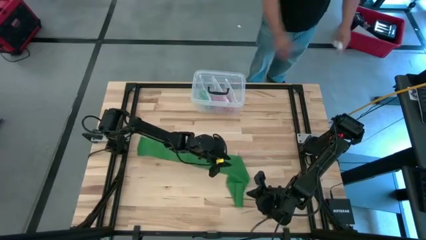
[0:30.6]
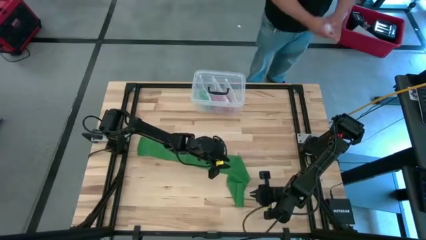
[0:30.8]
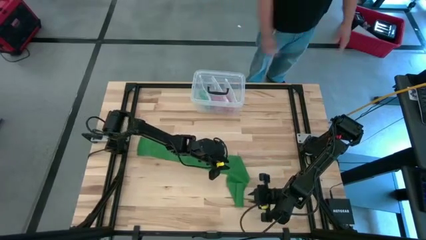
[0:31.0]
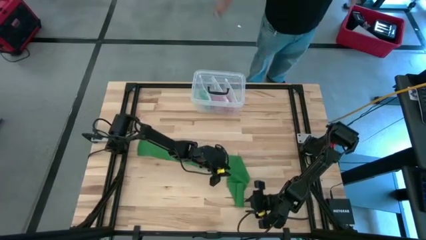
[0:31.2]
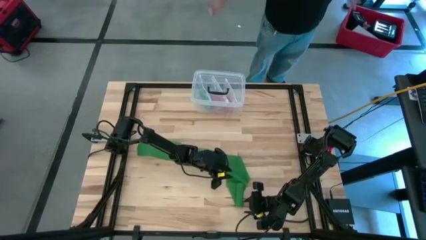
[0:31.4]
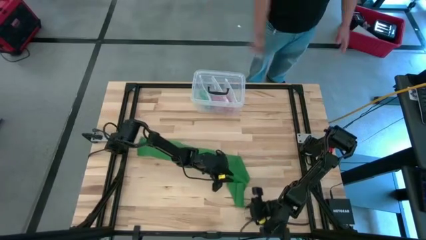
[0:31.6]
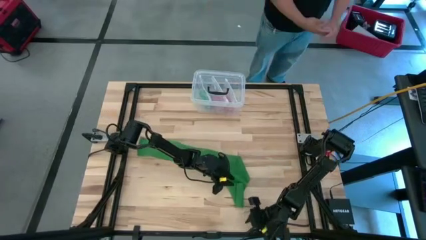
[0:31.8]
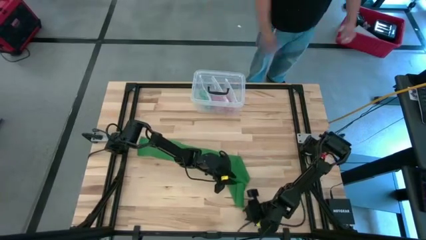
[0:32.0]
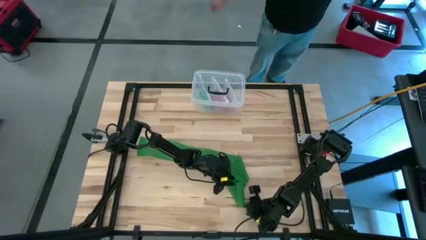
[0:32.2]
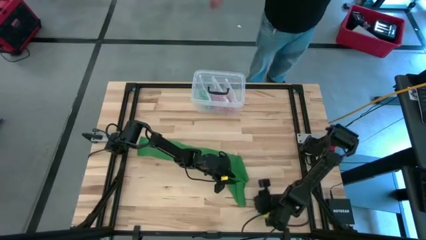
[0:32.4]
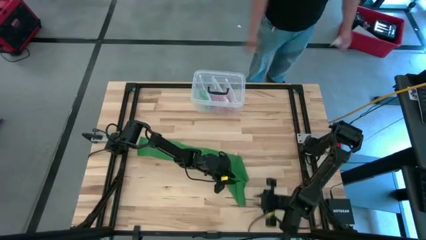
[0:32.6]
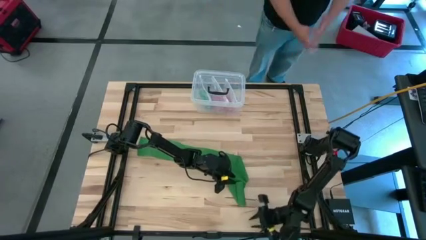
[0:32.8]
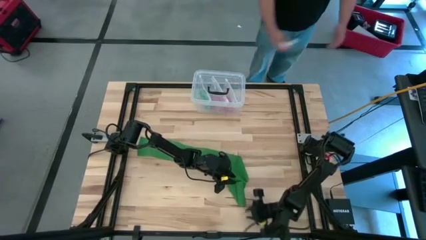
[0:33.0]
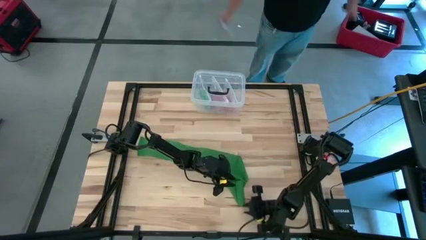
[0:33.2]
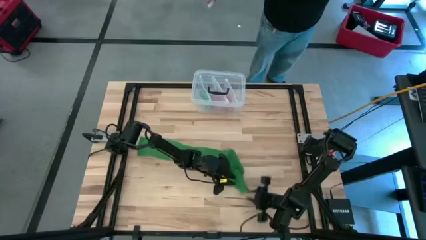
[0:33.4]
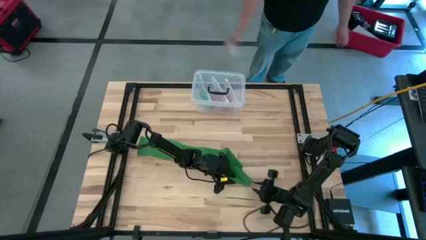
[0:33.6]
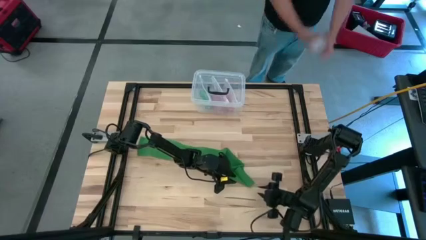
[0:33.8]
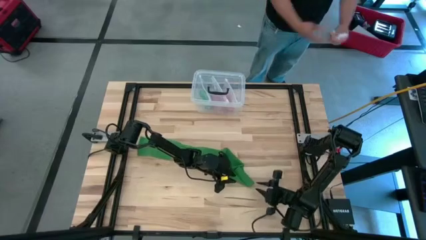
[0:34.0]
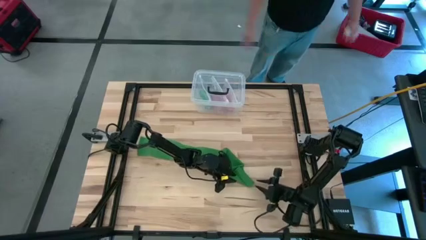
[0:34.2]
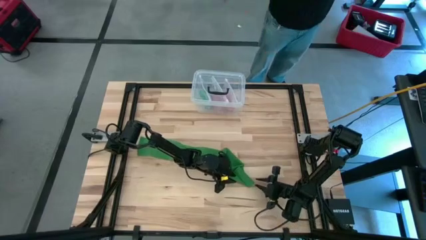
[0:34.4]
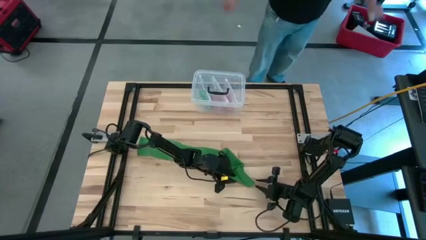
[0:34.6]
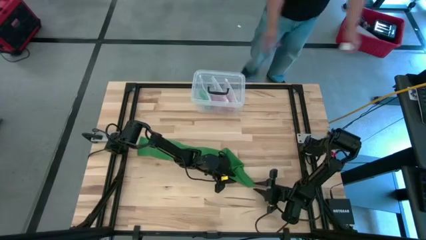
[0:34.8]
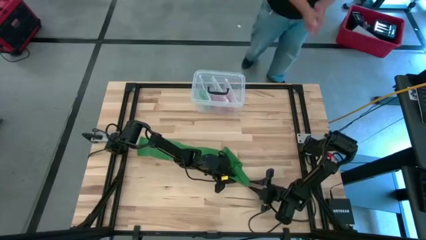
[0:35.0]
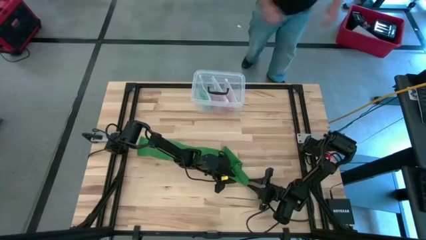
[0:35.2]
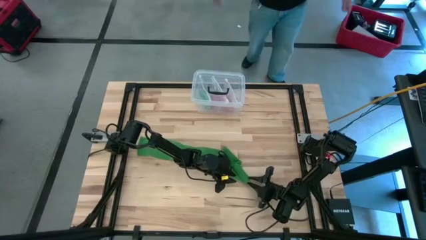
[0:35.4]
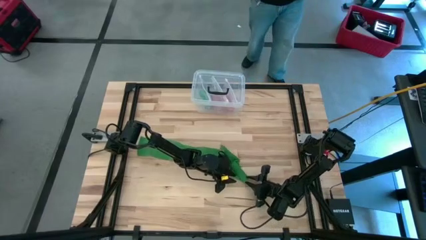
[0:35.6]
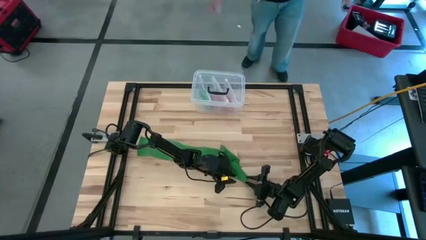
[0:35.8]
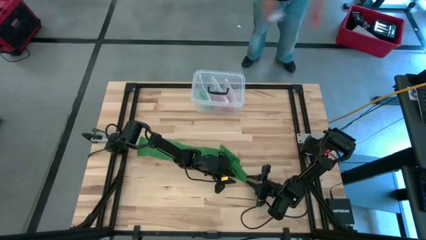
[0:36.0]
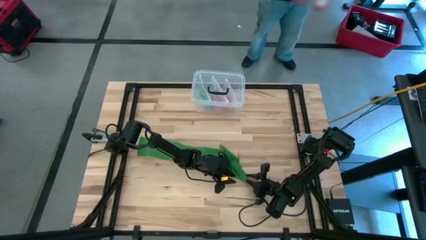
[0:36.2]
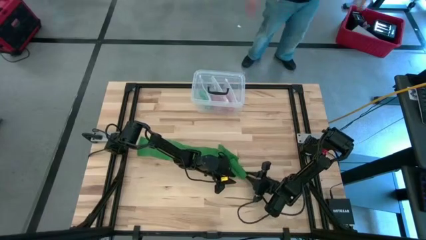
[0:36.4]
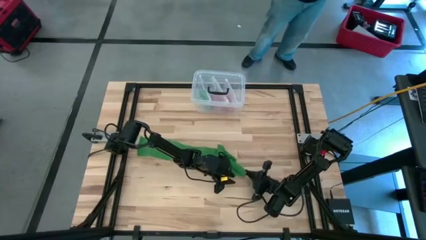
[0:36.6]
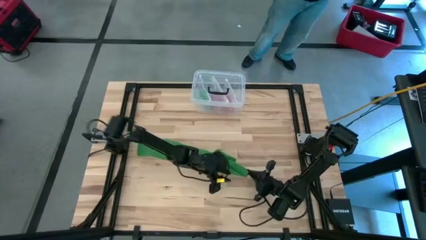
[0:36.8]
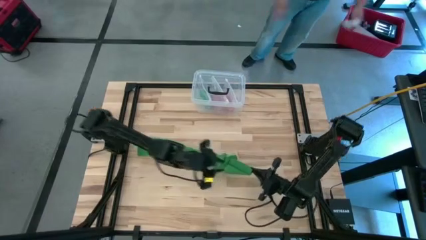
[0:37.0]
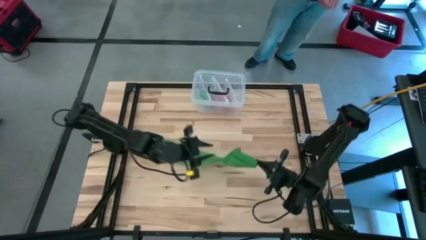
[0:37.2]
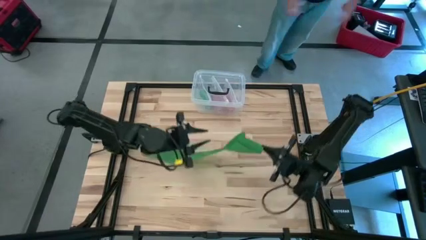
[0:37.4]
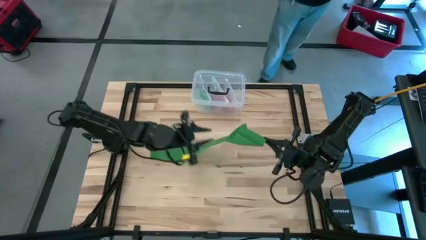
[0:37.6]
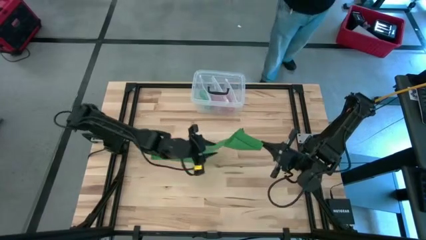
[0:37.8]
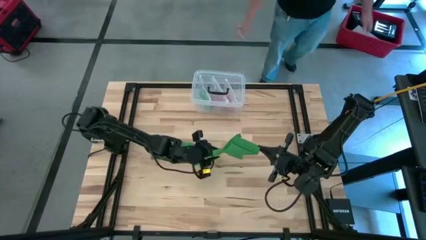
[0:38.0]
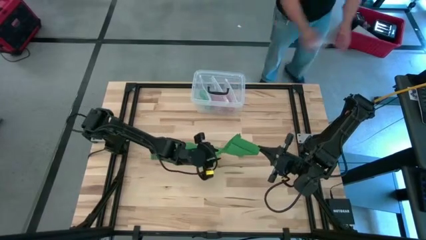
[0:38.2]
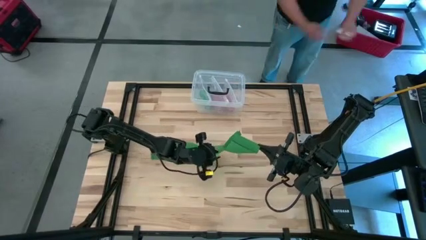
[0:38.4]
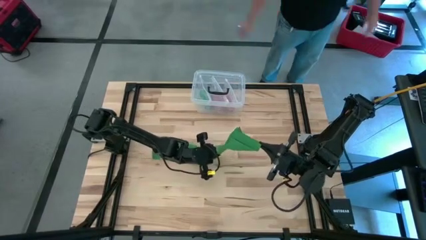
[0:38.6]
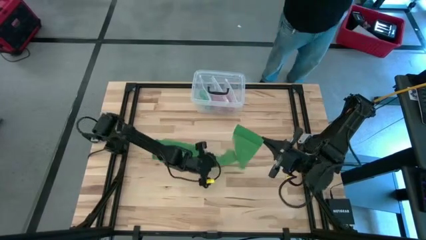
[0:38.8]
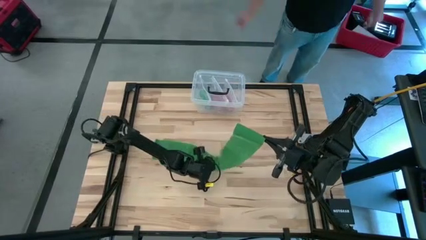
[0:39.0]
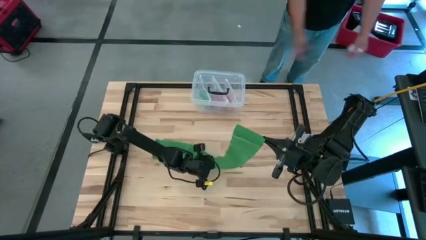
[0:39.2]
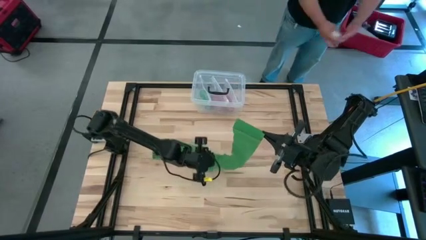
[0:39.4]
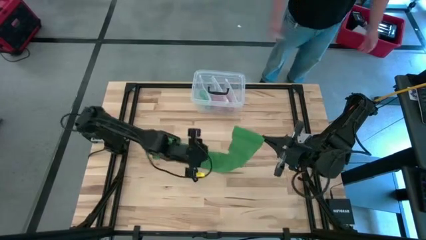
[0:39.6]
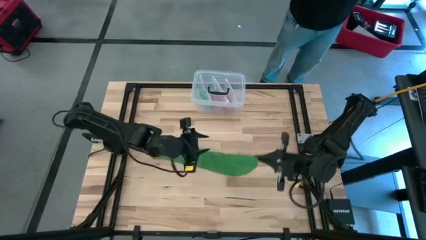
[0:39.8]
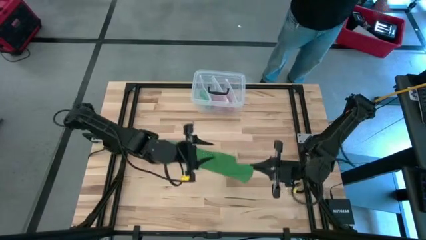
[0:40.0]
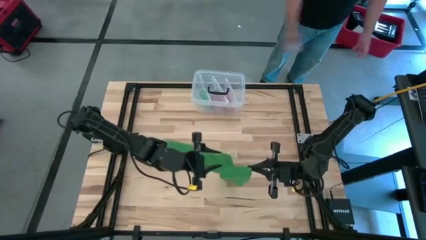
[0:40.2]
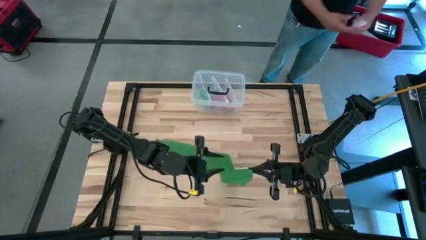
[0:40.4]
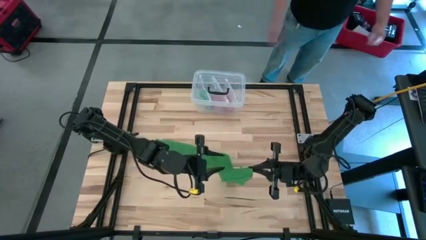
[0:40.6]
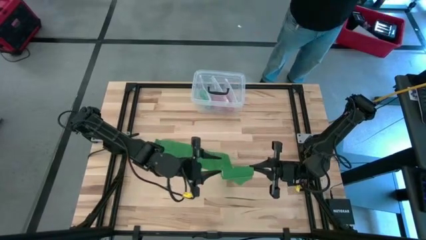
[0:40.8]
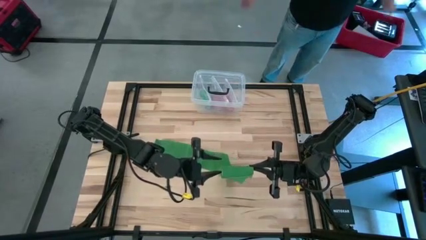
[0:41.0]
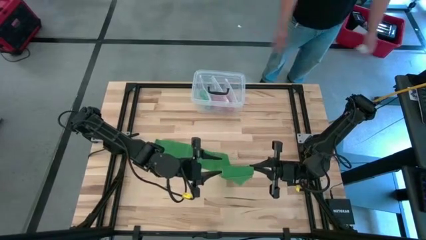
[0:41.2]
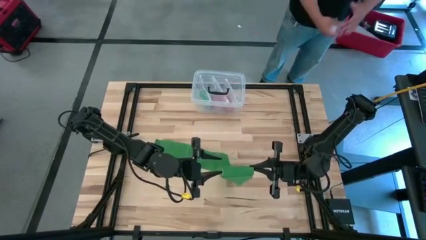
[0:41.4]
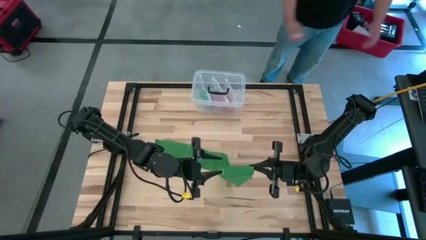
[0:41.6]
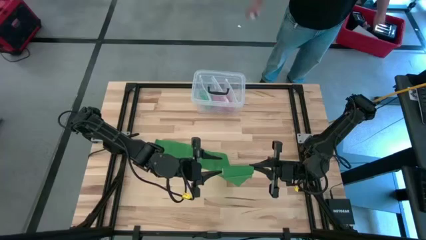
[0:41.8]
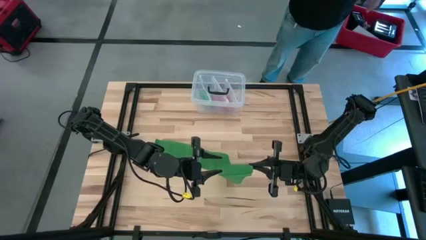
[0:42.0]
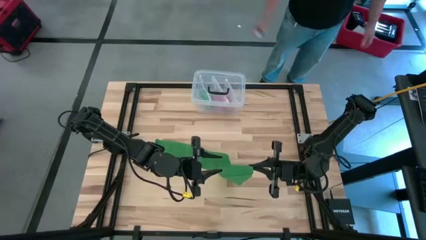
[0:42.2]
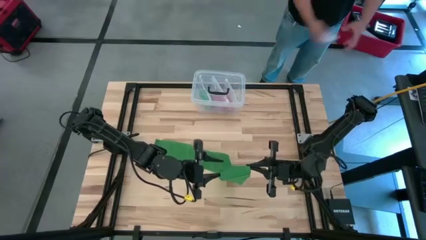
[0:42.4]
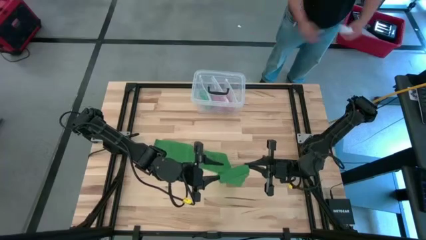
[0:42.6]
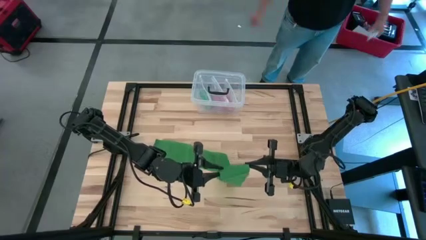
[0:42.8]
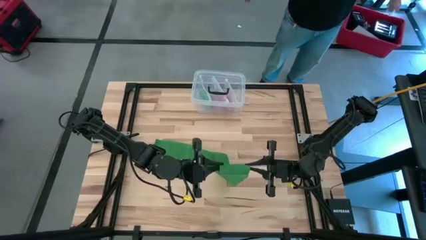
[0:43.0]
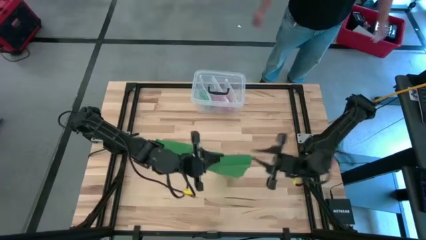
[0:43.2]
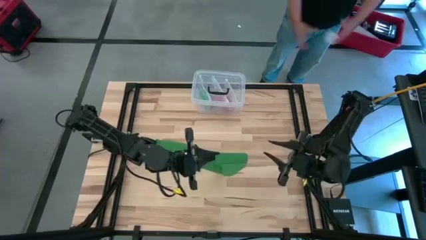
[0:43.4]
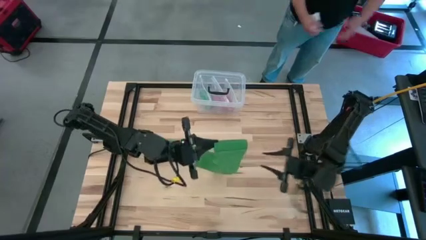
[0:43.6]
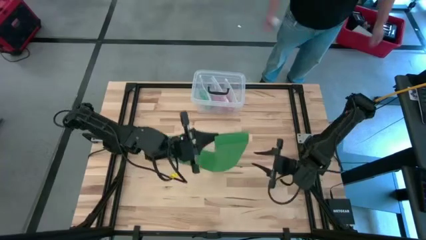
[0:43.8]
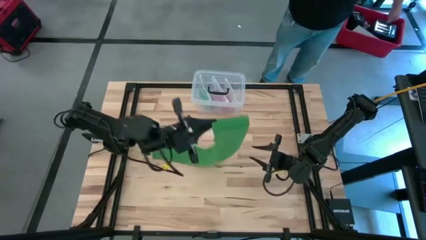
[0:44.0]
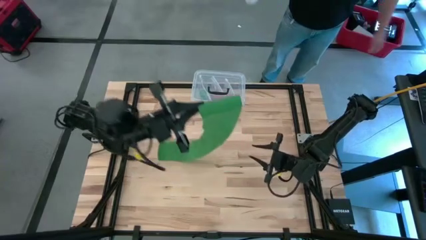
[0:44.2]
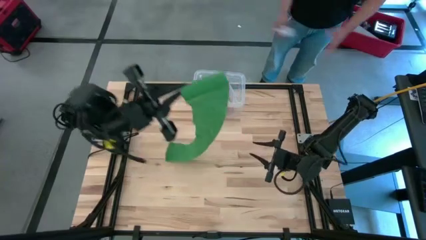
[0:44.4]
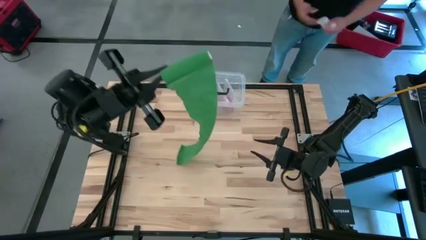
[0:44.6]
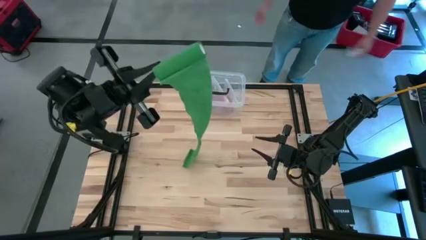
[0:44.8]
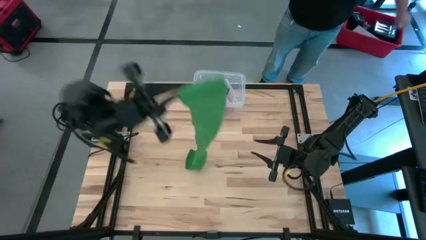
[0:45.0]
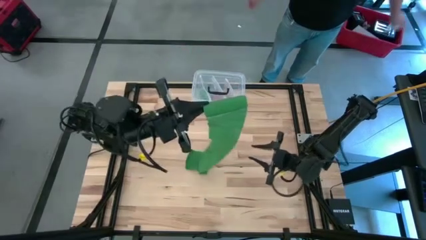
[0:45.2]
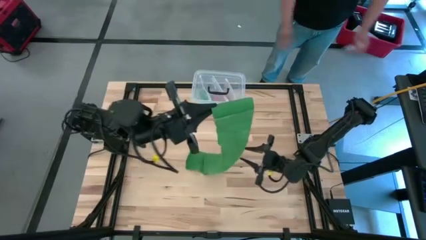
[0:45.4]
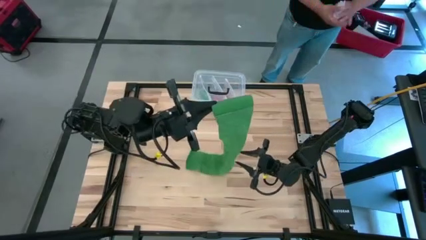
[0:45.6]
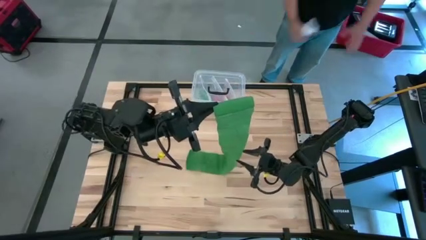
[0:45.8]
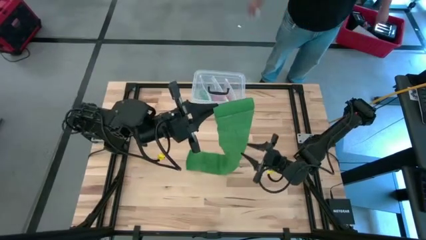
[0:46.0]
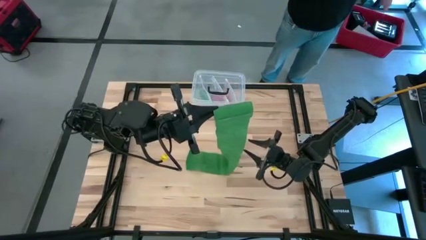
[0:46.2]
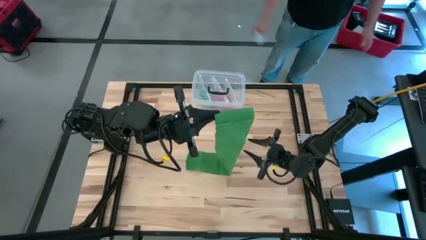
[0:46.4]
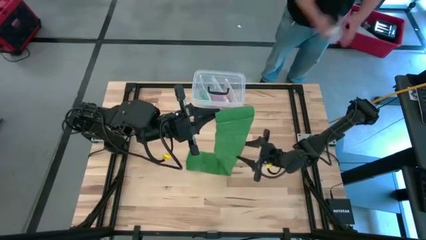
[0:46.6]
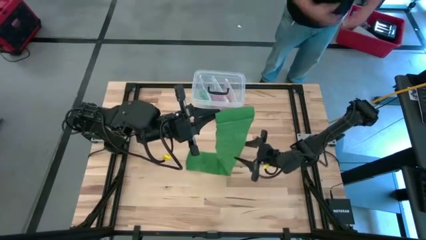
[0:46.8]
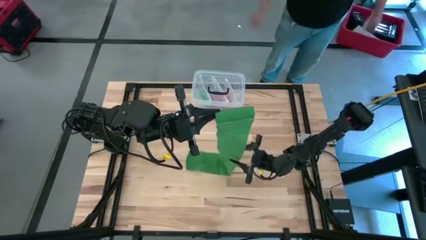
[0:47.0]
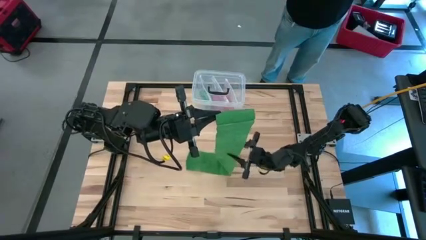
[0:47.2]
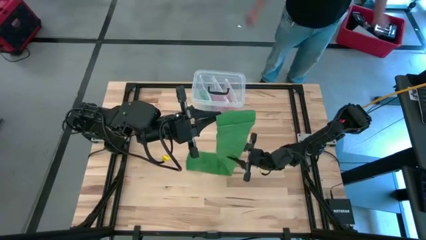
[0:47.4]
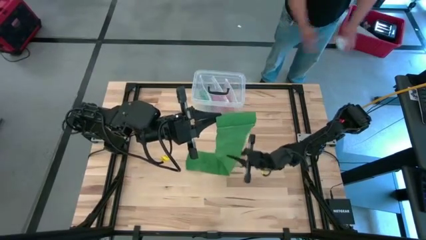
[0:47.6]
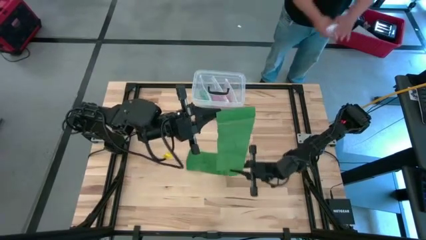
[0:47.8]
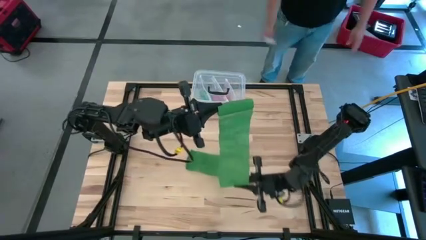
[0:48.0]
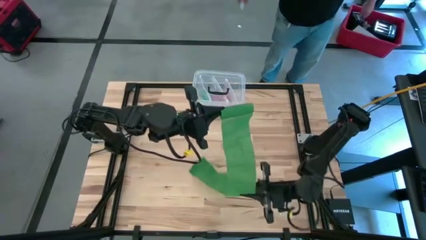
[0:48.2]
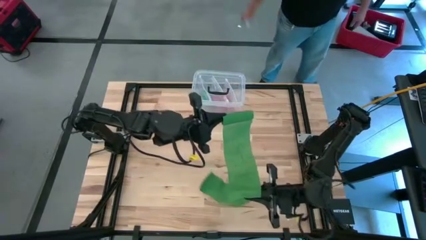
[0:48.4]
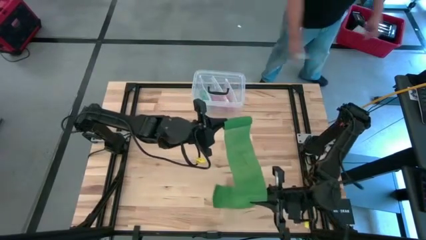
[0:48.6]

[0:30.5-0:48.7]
Task: Roll bandage
Roll the green bandage
